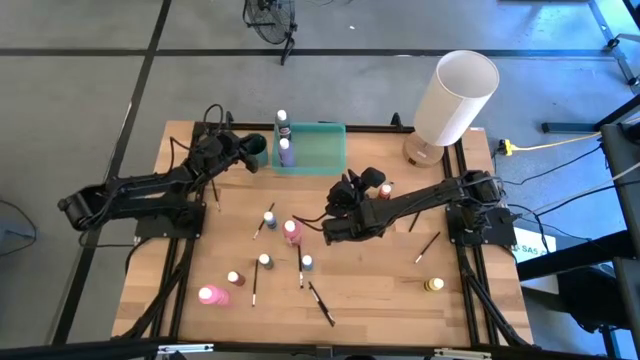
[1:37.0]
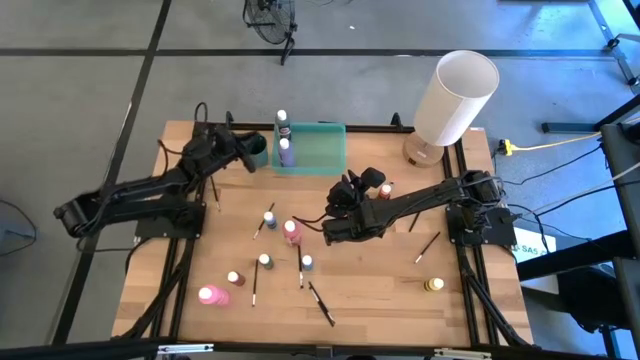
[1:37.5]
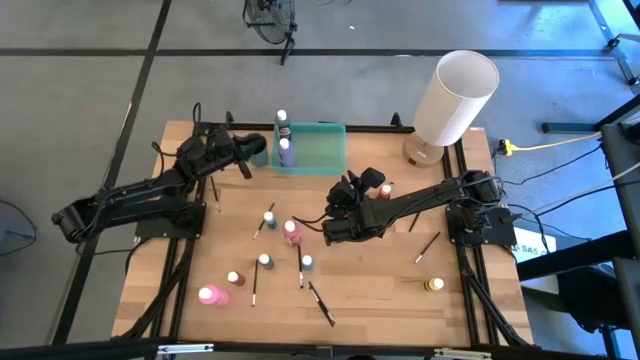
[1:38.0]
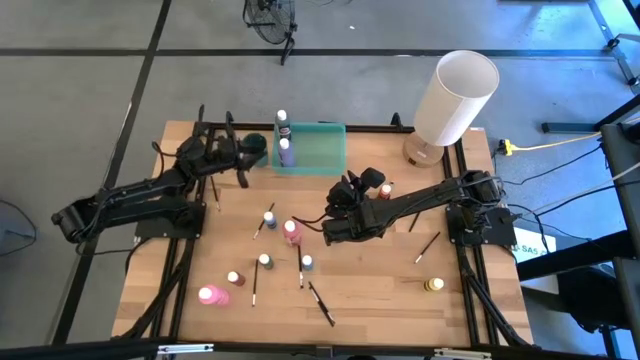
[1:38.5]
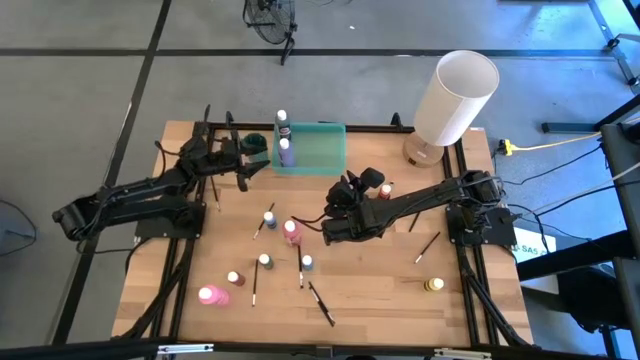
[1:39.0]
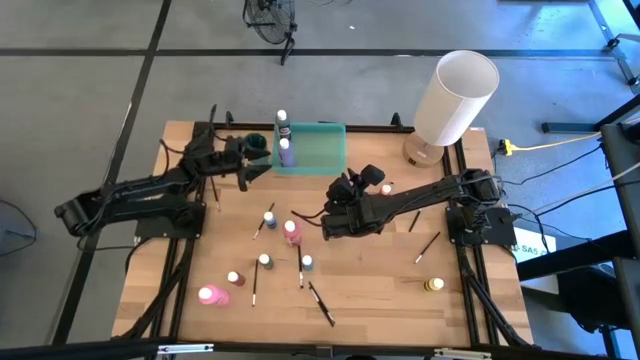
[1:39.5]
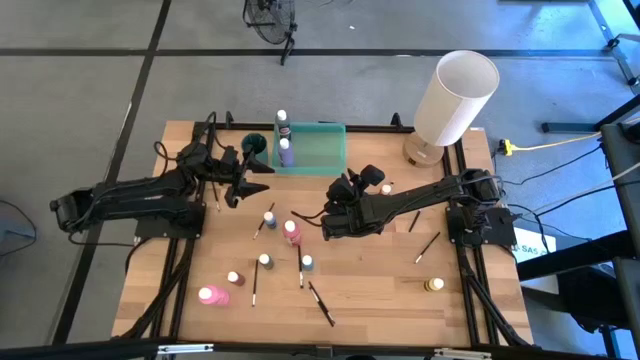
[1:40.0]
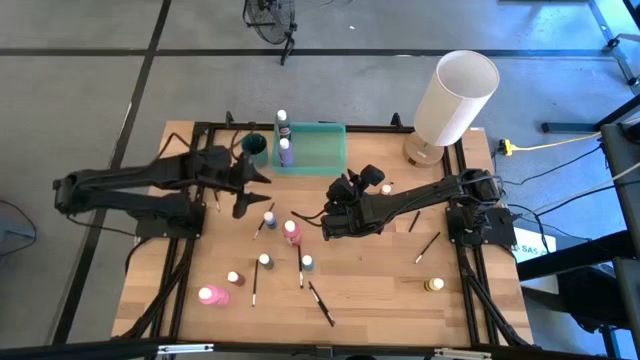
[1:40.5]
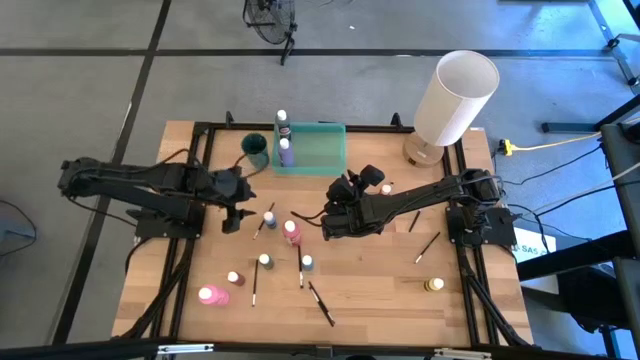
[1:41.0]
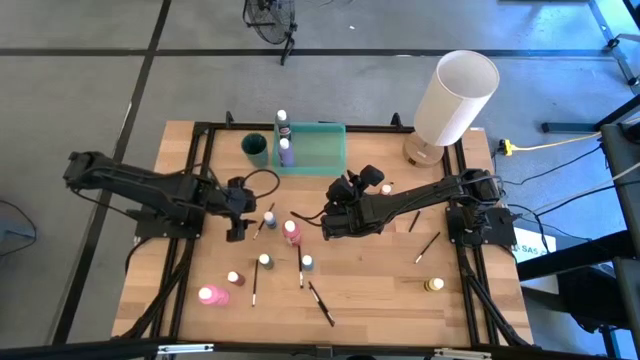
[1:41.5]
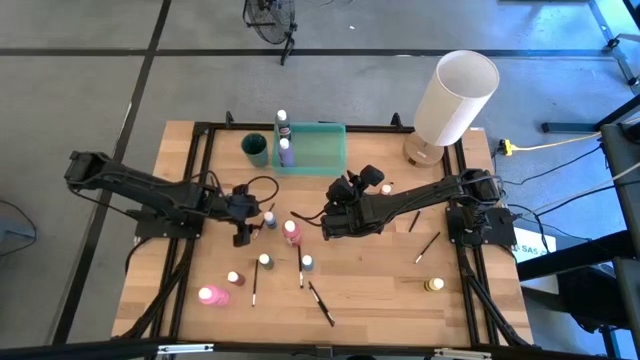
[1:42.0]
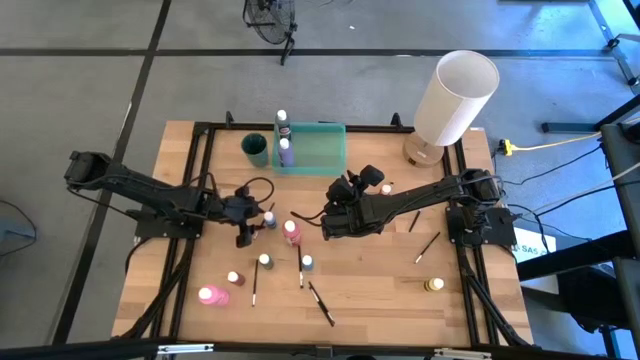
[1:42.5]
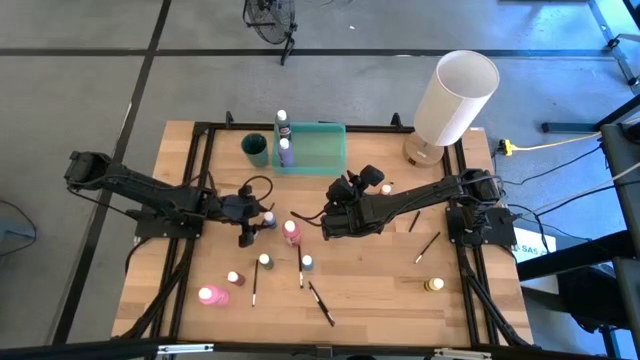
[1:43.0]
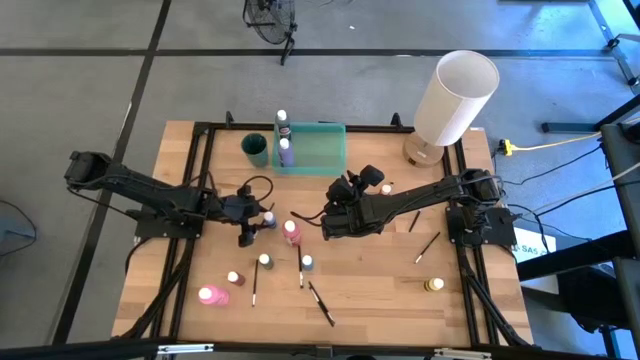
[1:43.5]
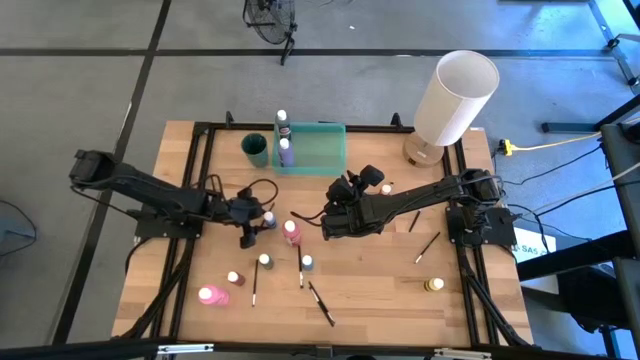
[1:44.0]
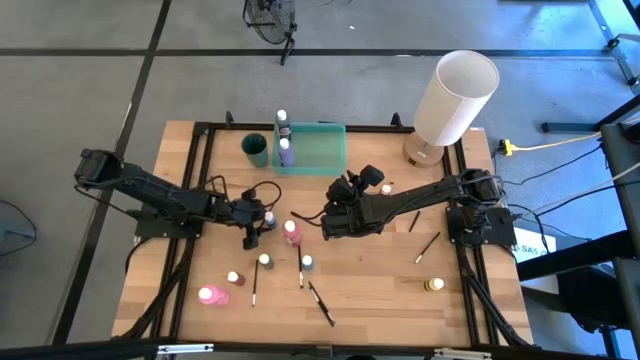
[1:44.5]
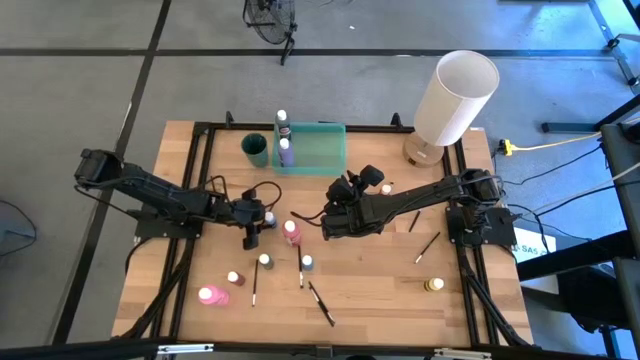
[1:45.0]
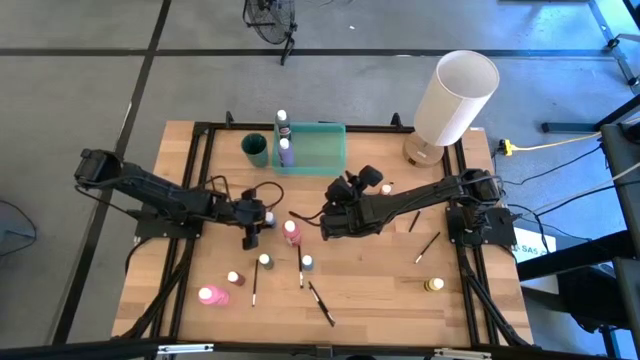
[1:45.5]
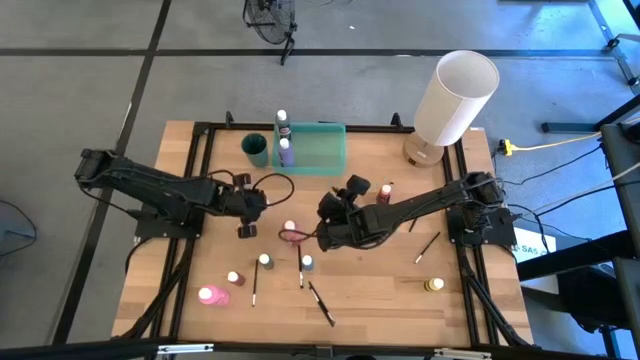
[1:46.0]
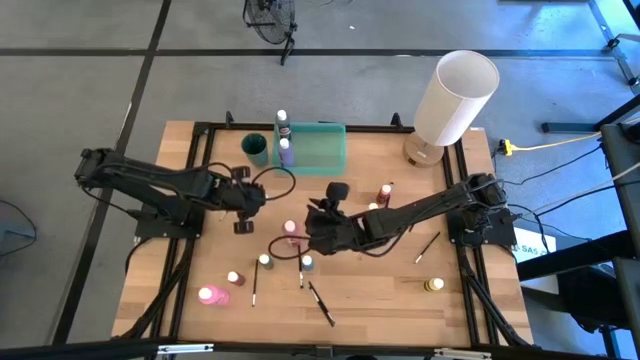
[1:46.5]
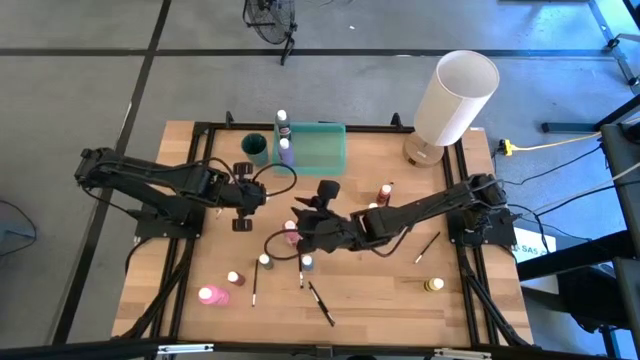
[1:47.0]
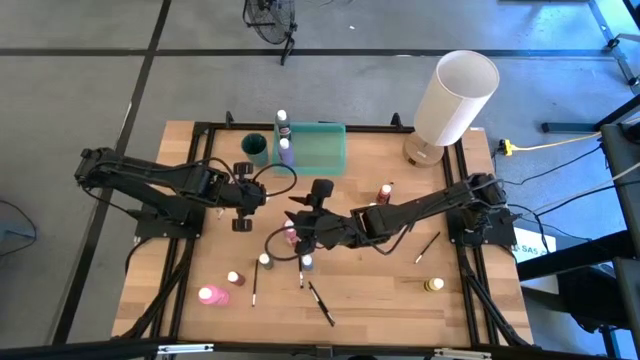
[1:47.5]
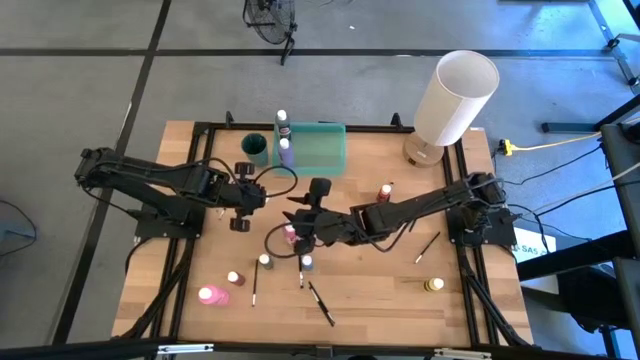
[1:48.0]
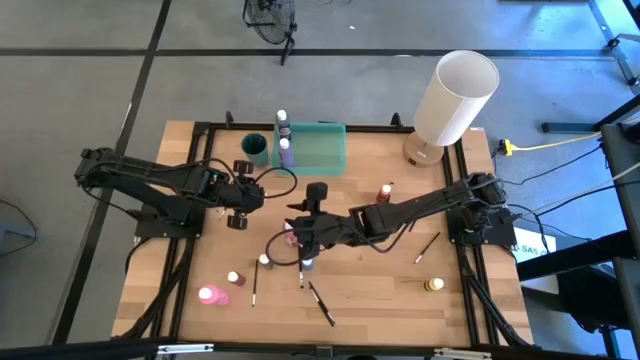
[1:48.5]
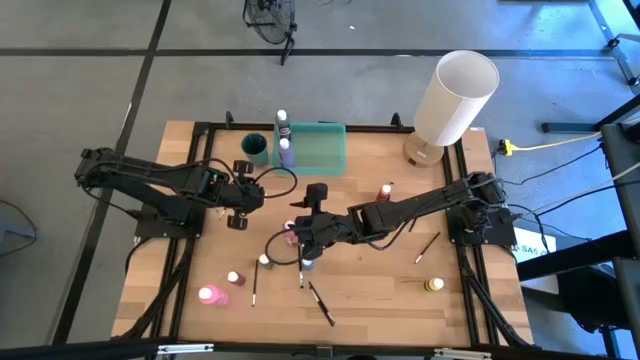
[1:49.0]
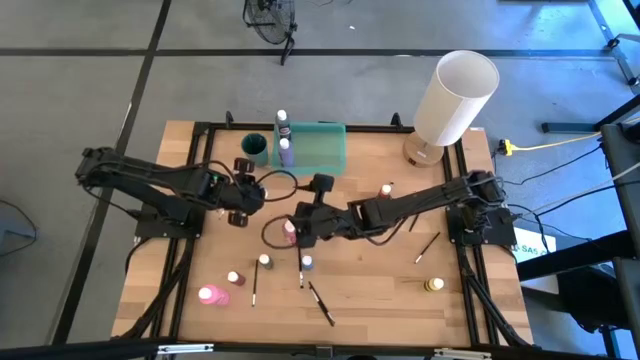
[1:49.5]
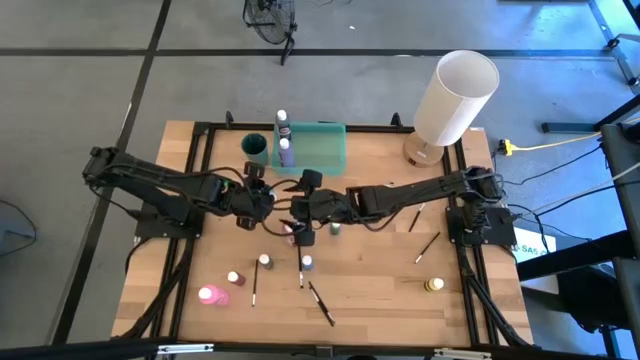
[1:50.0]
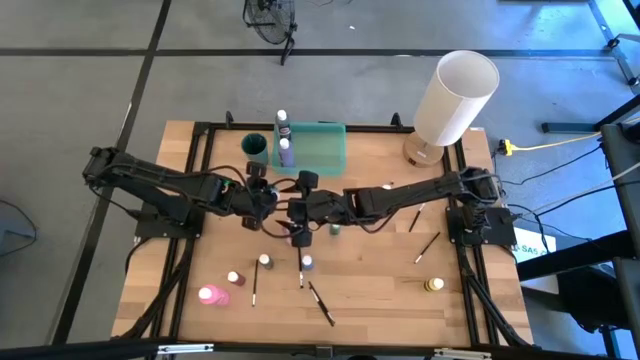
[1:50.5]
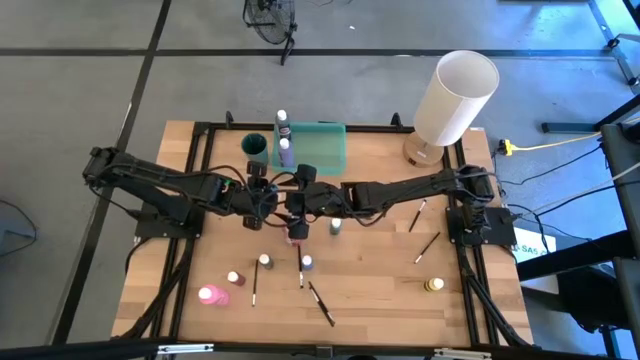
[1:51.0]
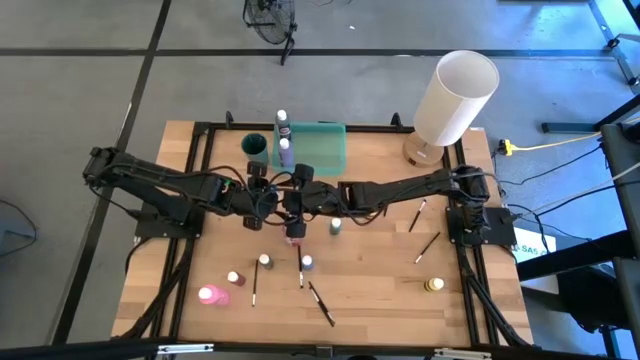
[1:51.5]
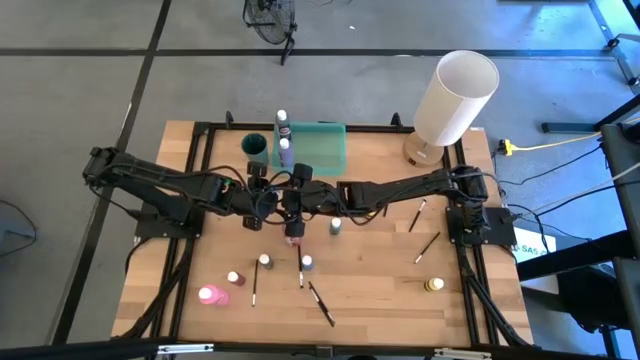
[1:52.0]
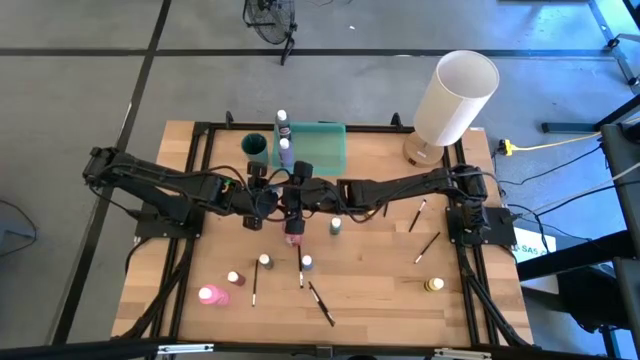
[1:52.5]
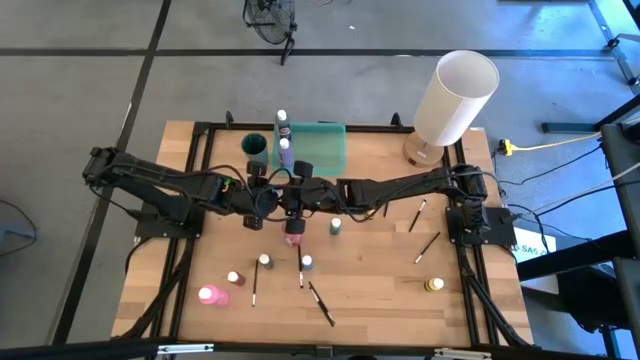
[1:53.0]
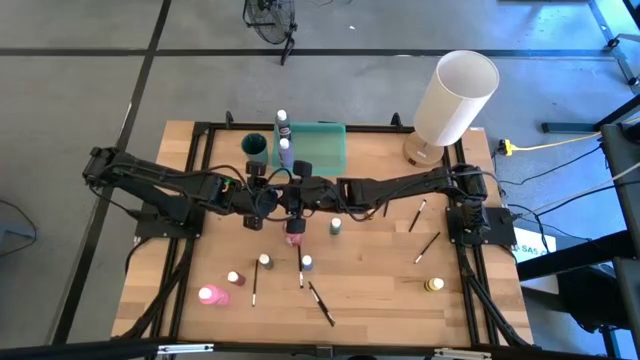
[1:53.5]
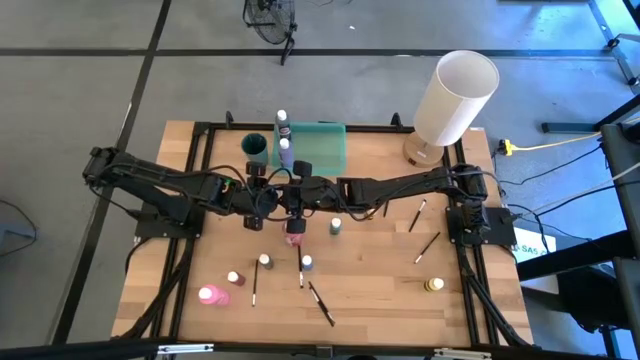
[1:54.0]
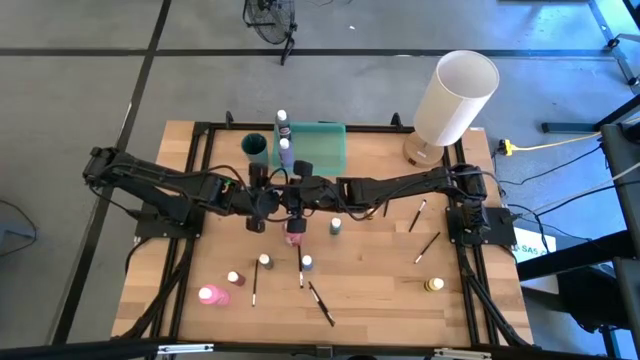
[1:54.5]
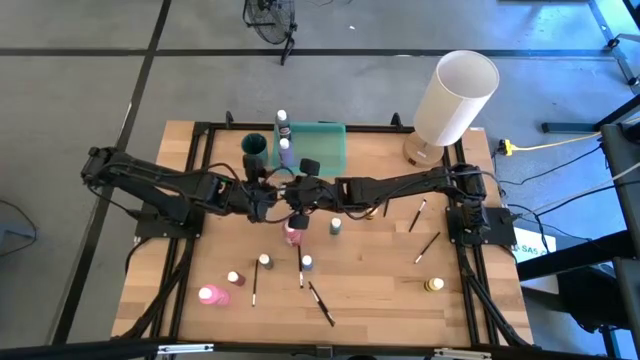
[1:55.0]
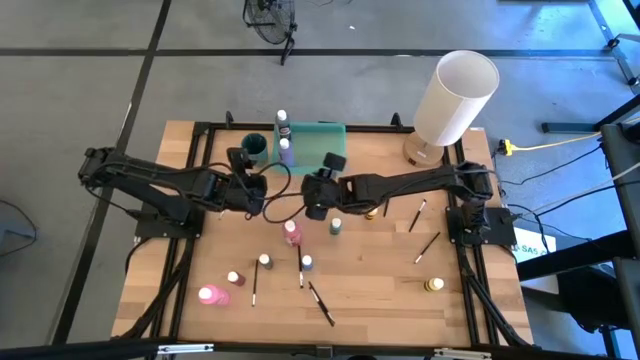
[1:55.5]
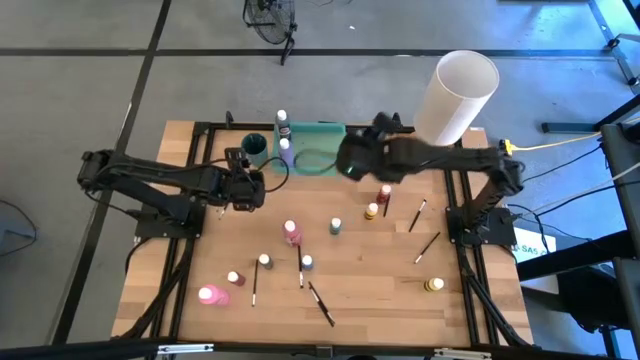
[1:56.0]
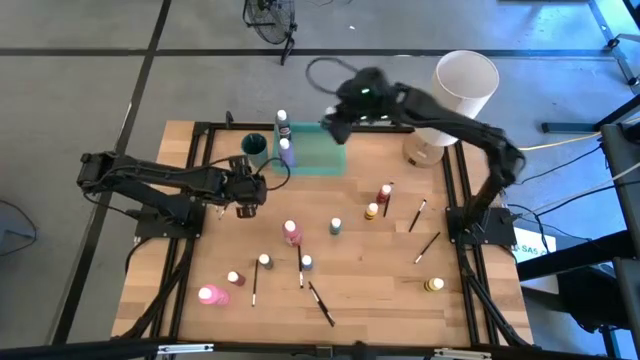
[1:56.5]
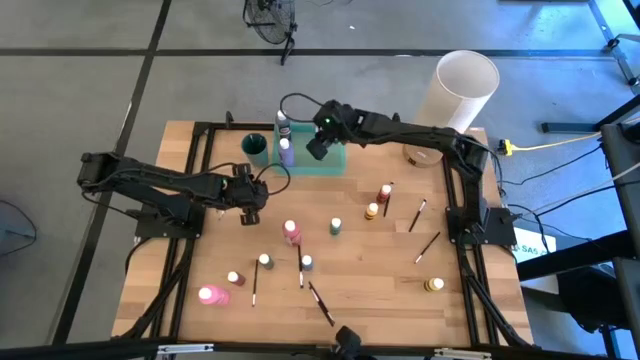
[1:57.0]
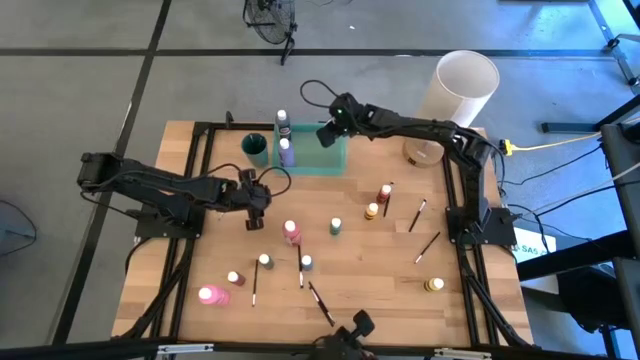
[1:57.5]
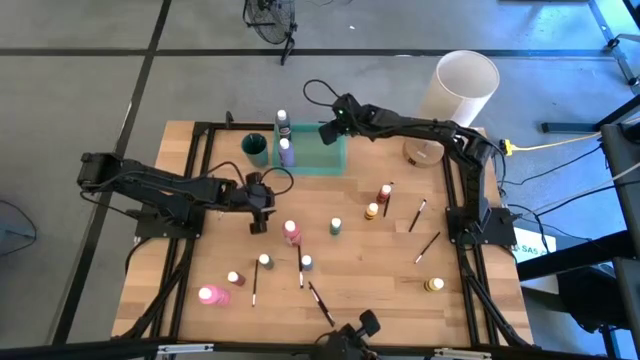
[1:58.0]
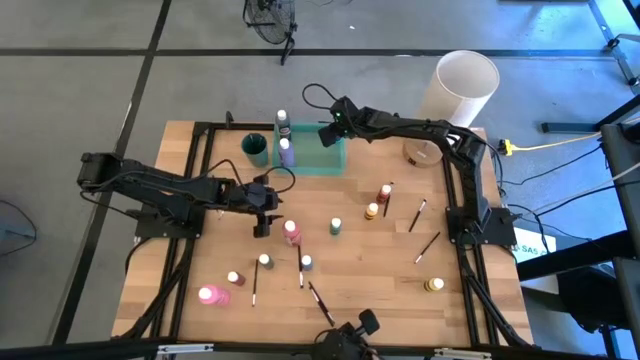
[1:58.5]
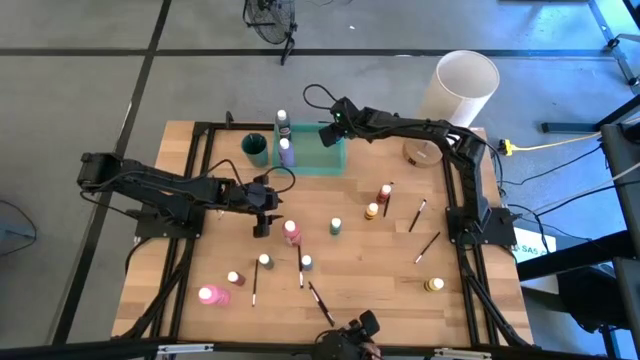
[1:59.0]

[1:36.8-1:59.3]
Task: Pick & Place Paint Supplies
Put the small blue paint bottle into the green bin
